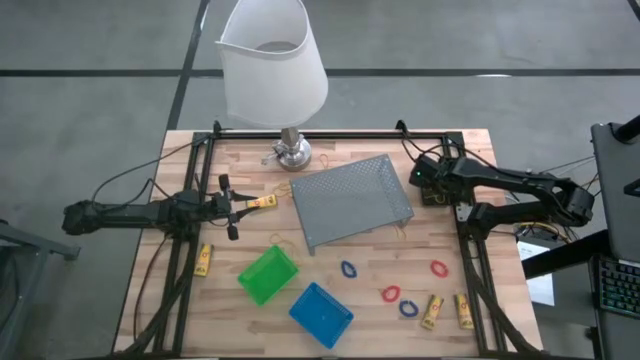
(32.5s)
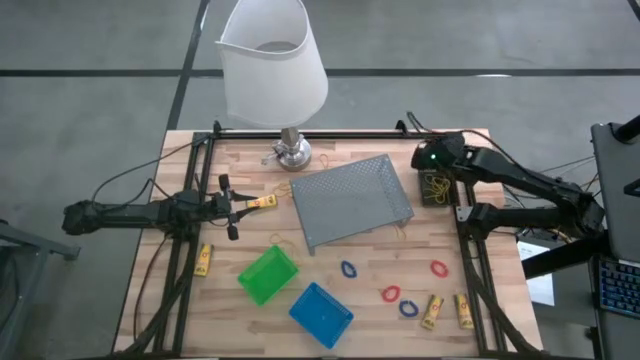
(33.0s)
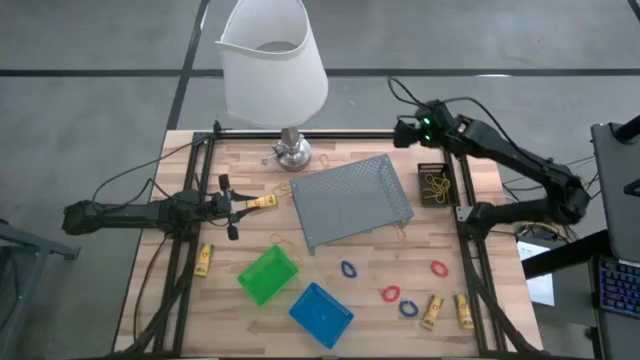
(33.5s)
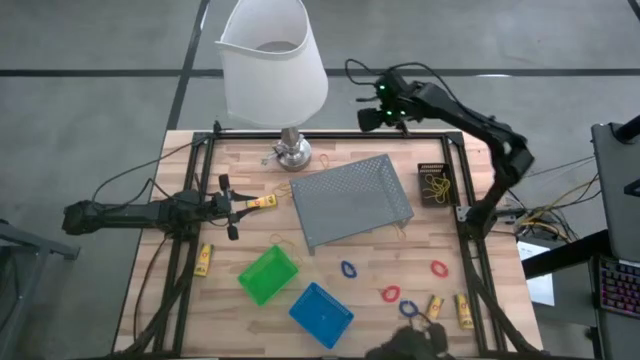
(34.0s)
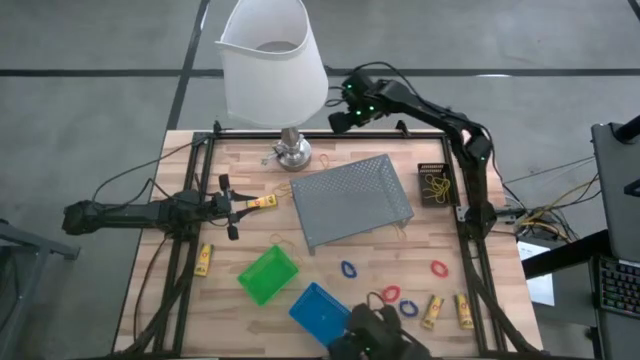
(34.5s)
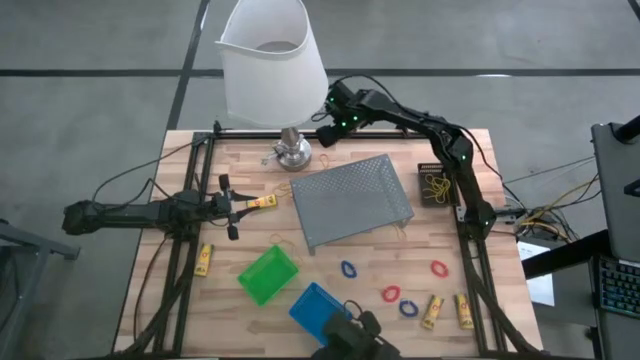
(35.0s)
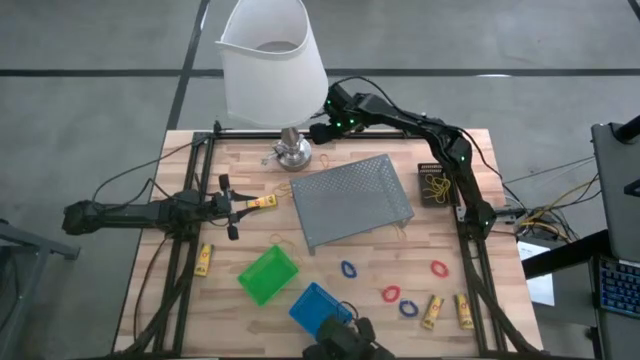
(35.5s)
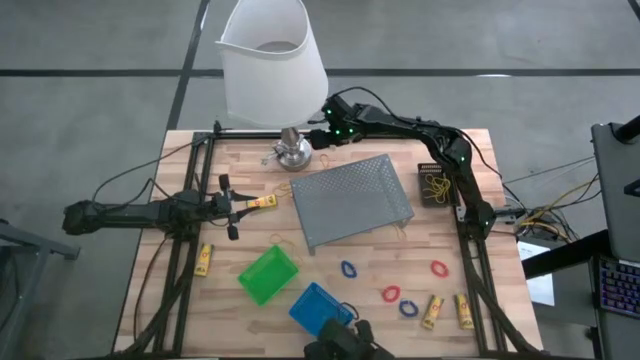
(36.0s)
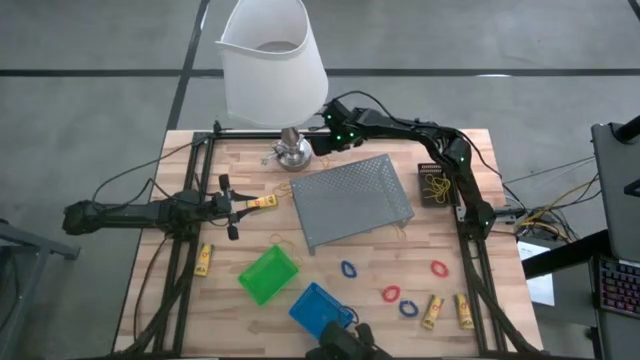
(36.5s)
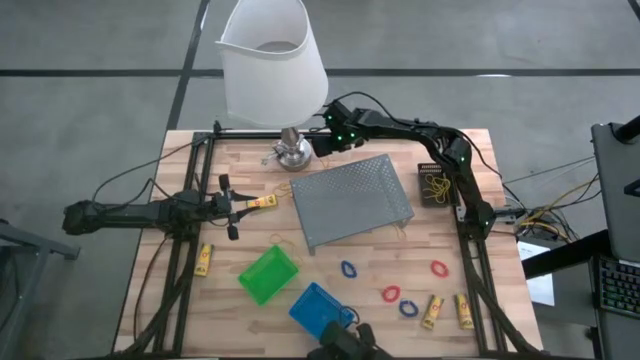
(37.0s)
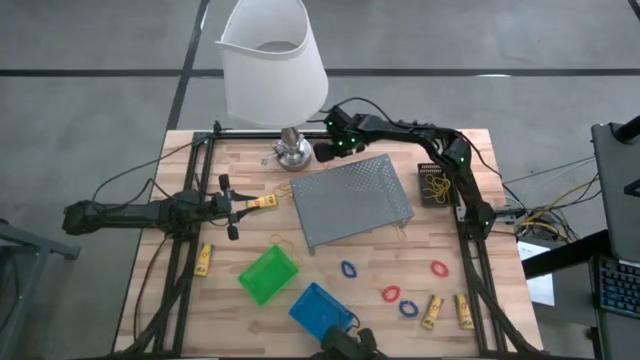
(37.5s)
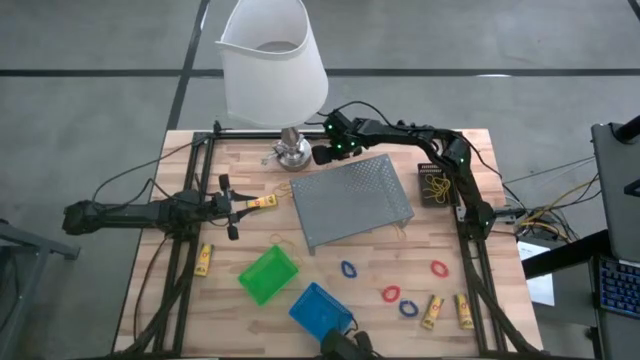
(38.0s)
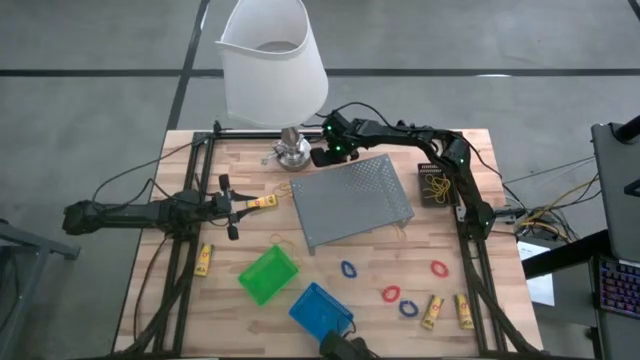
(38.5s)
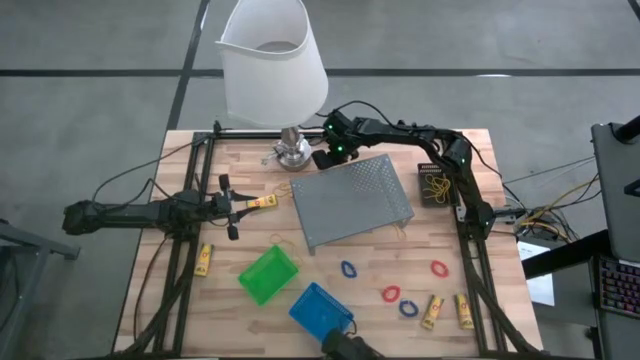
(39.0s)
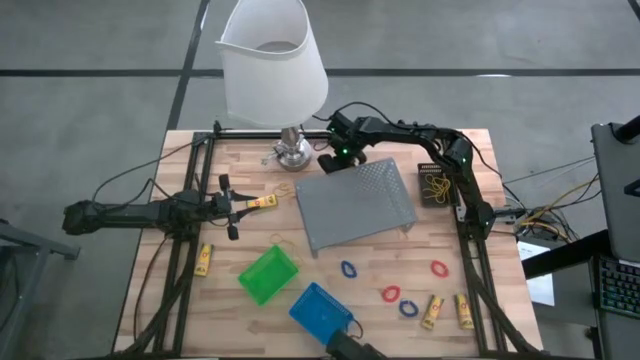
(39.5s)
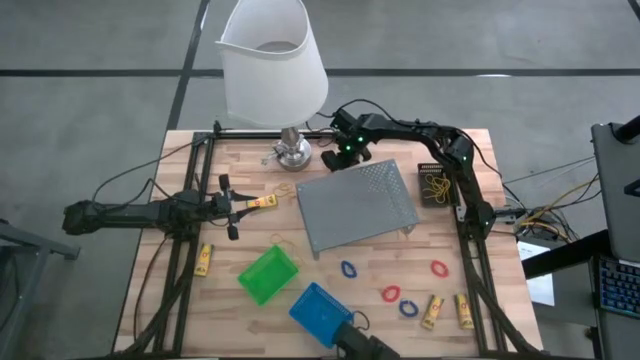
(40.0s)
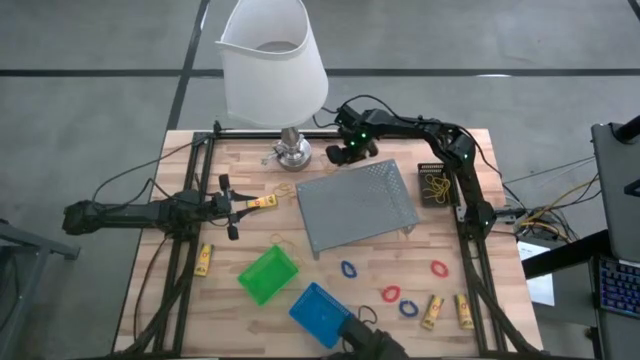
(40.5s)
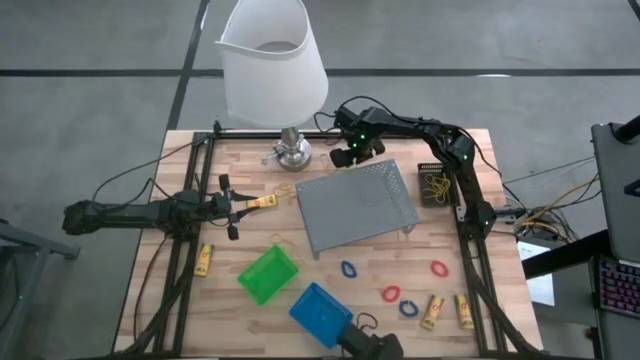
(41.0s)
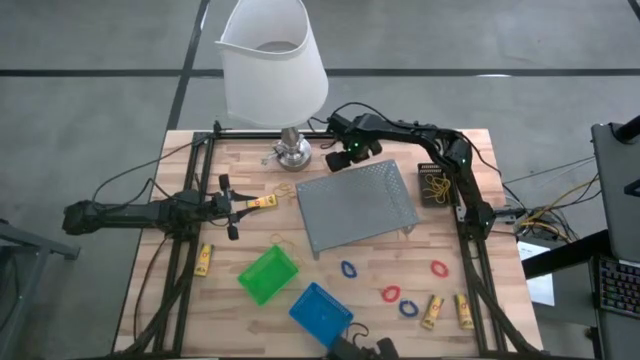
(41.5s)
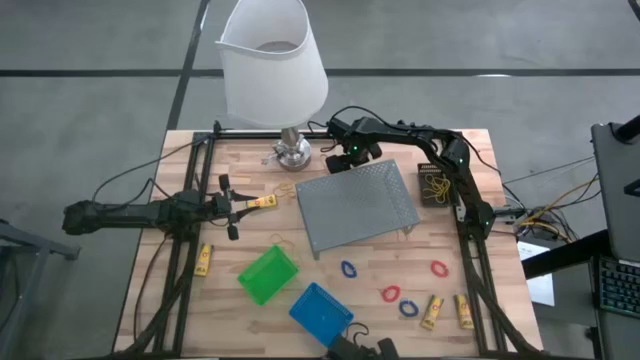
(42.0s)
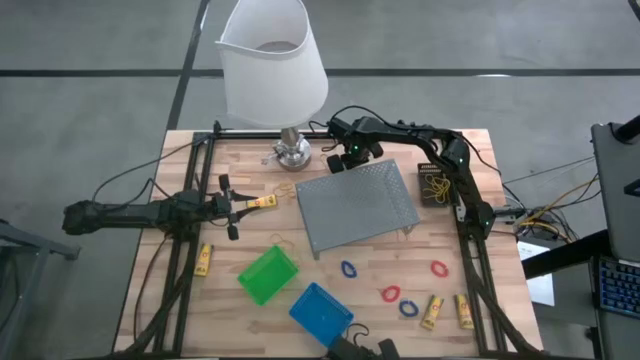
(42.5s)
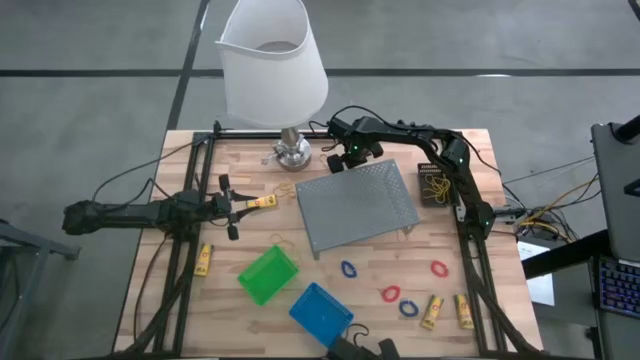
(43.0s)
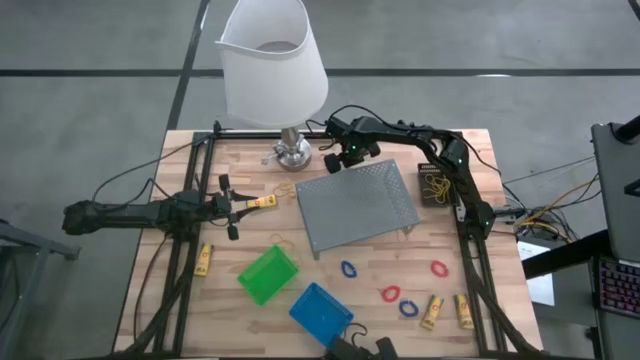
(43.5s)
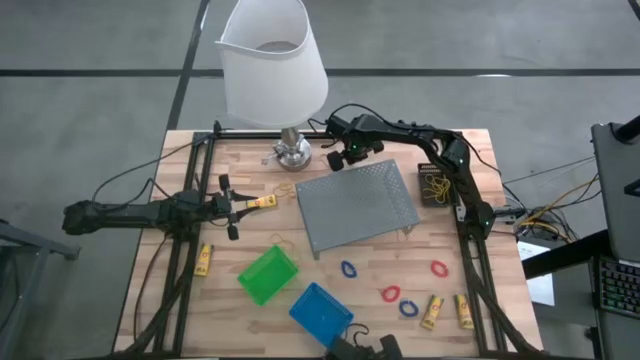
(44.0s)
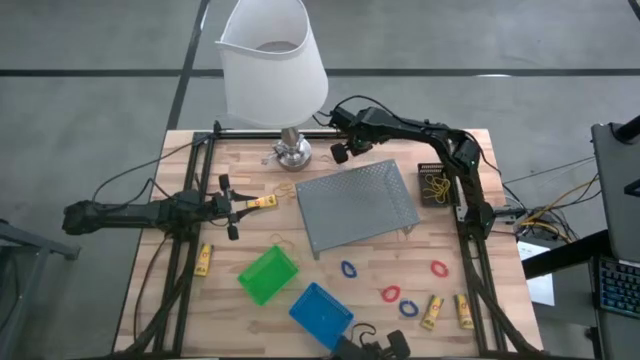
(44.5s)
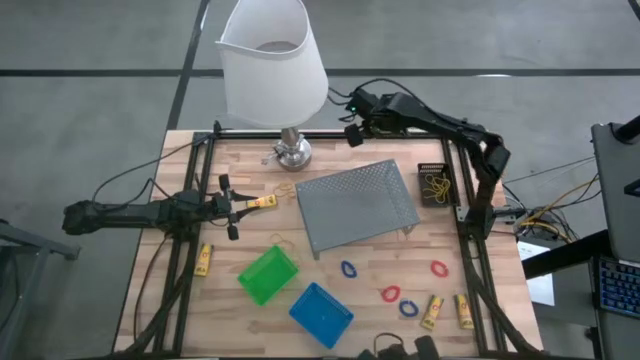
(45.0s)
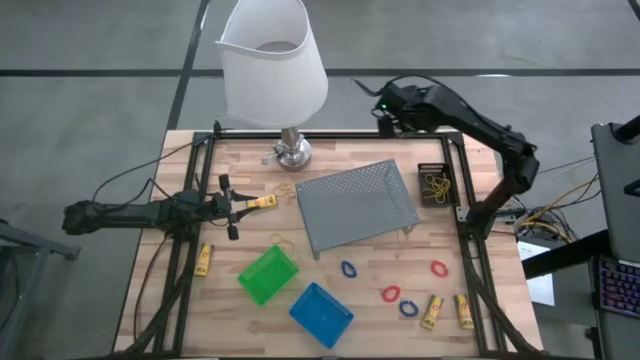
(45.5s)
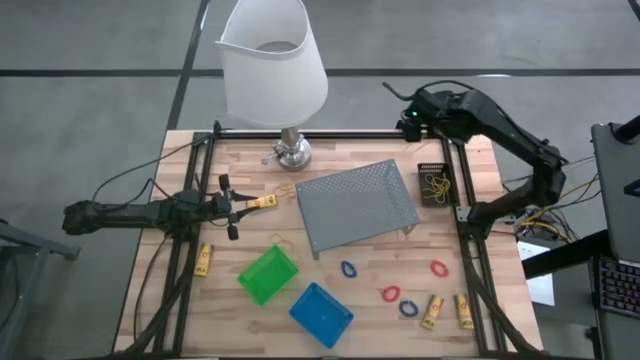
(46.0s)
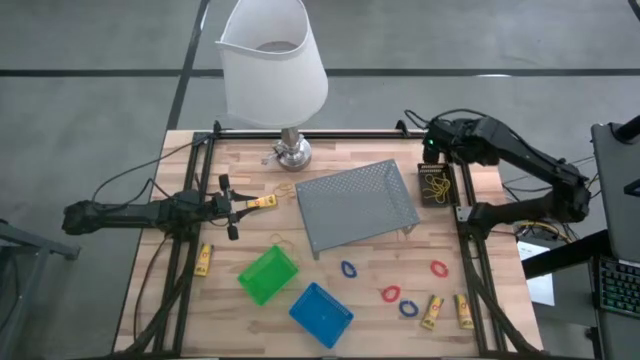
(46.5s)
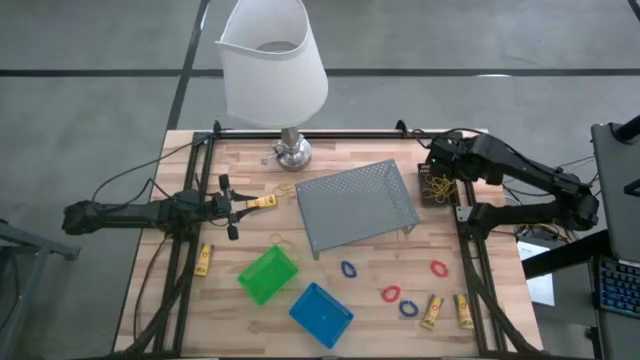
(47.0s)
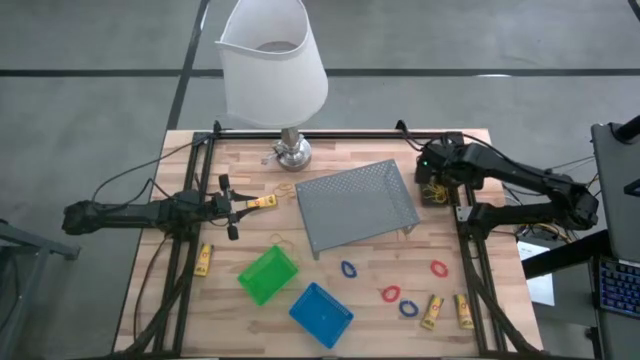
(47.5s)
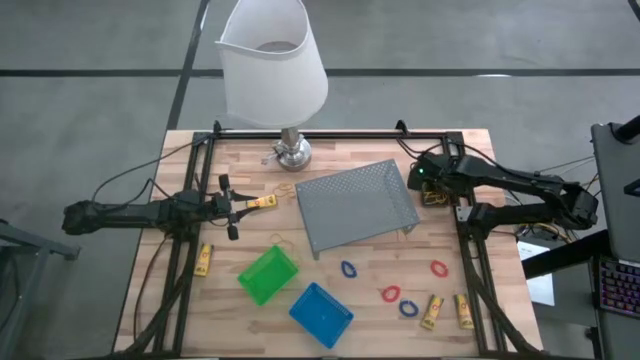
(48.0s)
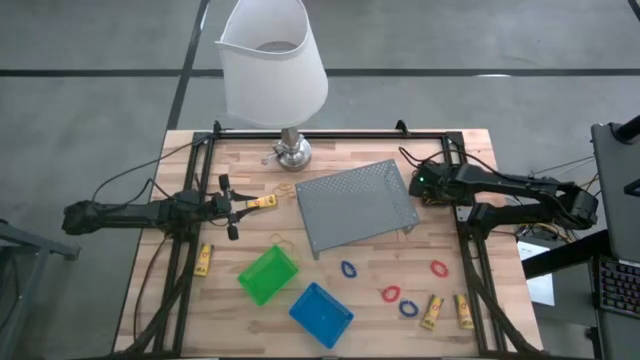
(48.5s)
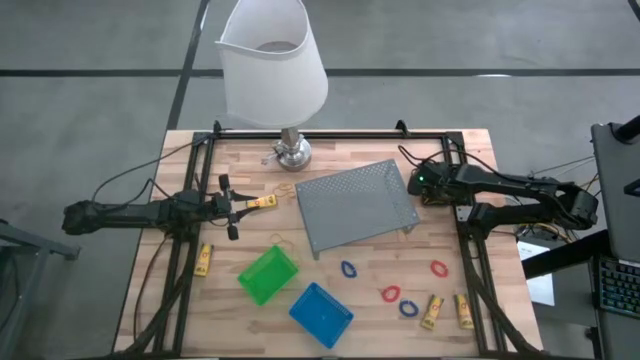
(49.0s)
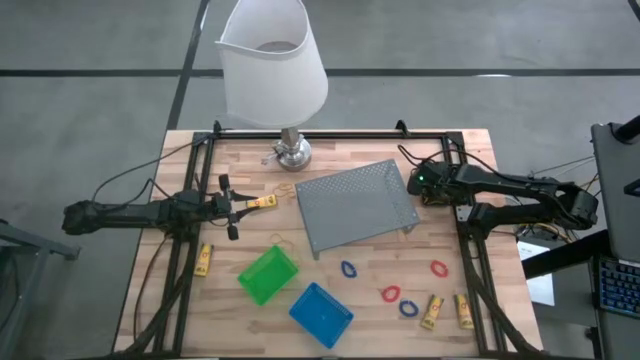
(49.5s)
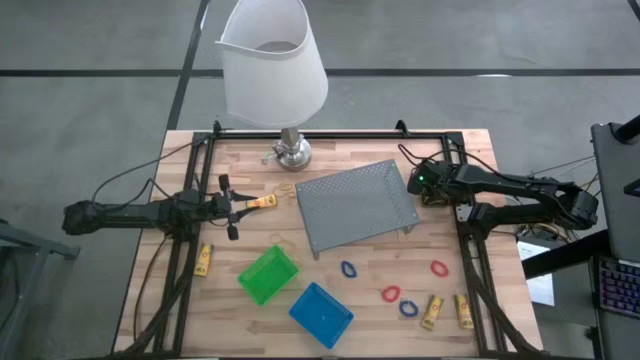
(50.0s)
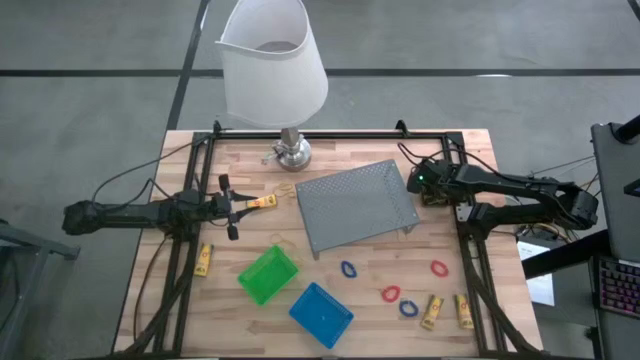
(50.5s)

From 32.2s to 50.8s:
Task: Pick & Place Office Desk Supplies
Put the yellow rubber band into the black basket

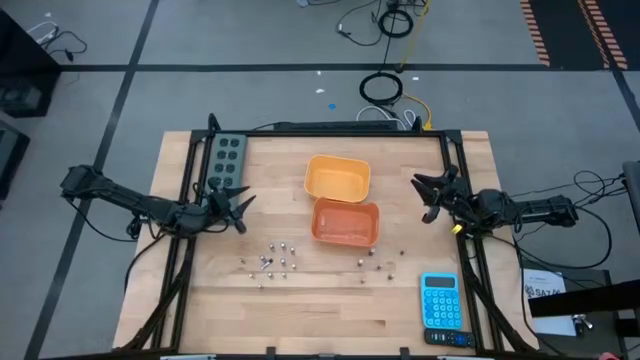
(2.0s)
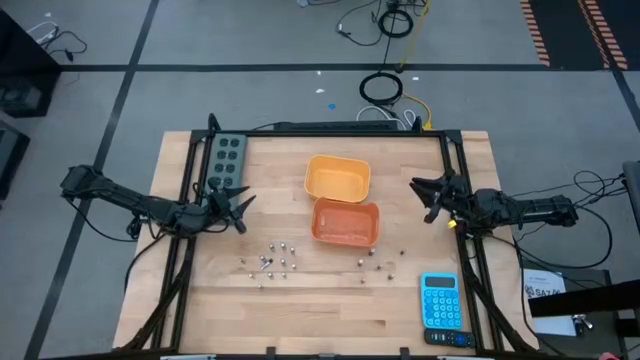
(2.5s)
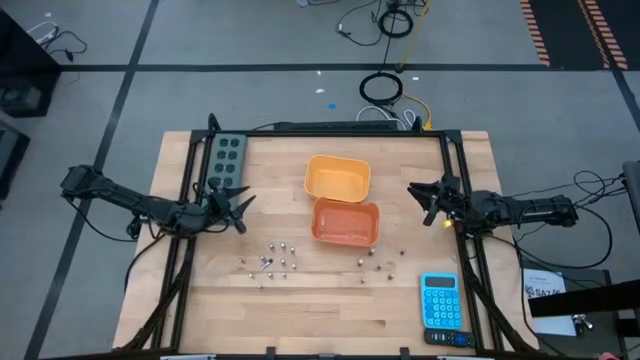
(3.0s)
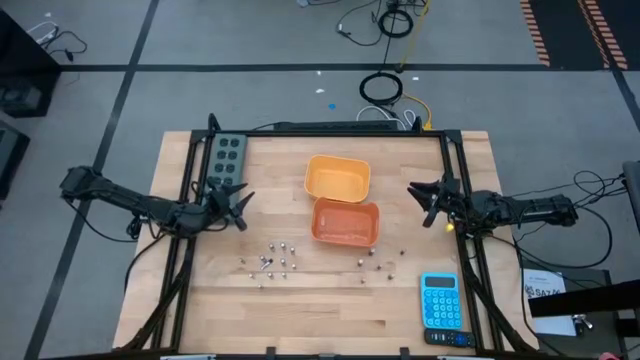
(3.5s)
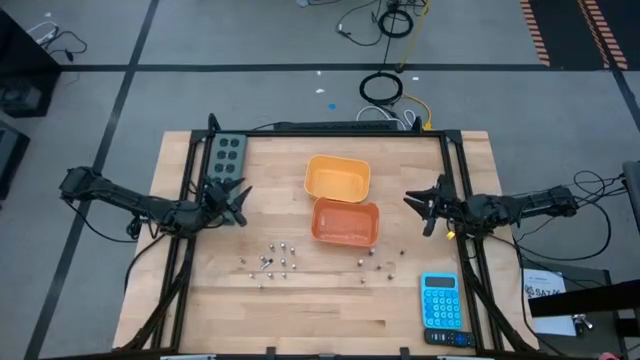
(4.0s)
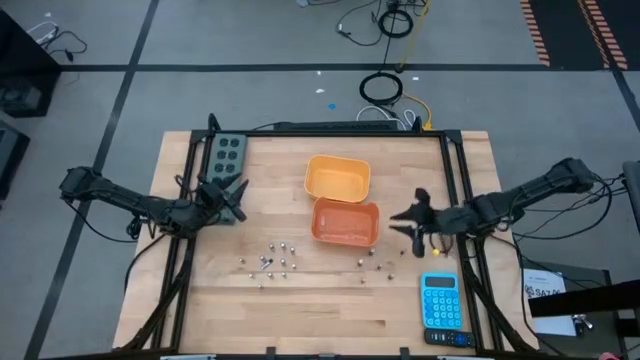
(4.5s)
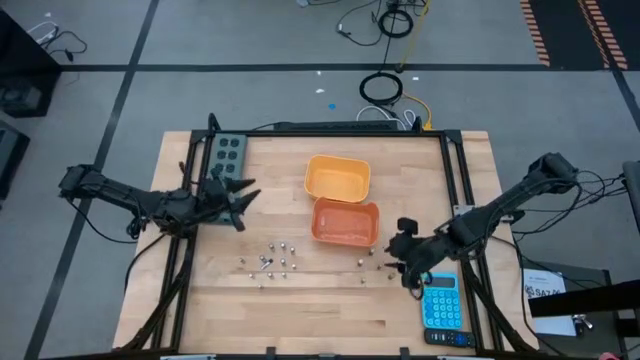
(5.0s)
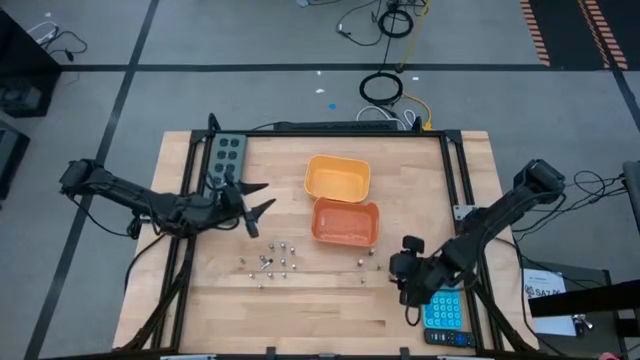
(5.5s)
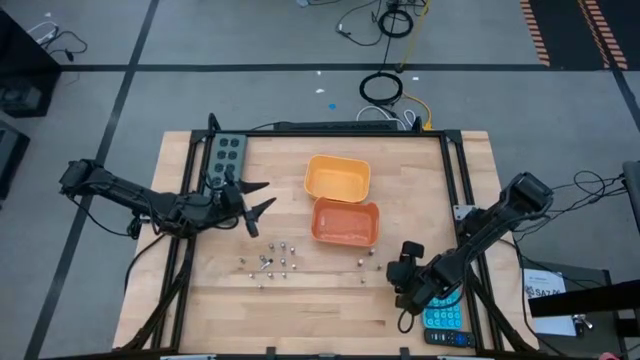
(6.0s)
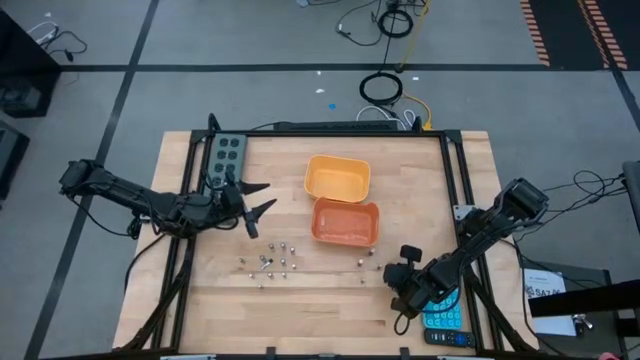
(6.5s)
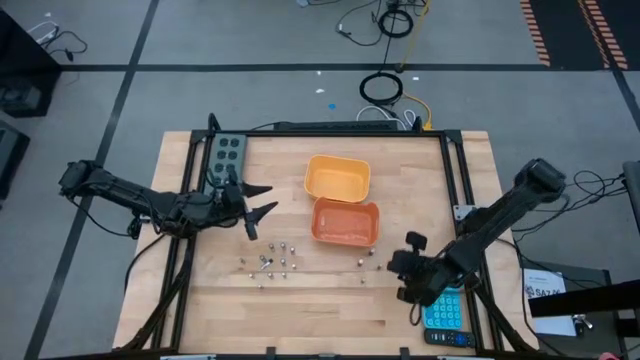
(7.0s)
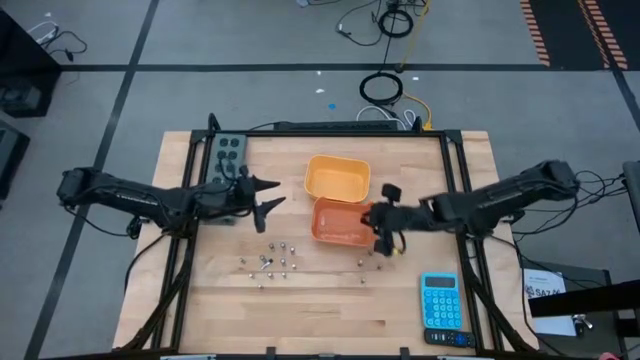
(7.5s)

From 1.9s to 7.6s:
Task: Sort batteries
Put the black battery into the orange bin
